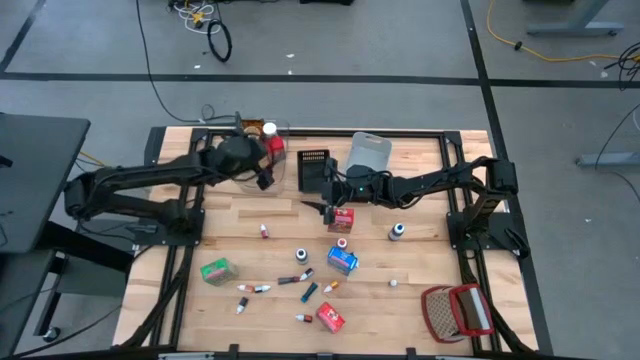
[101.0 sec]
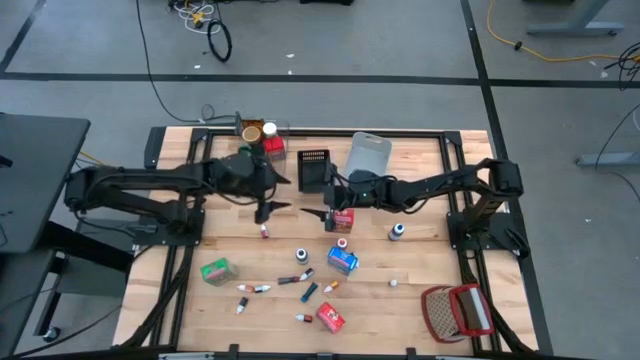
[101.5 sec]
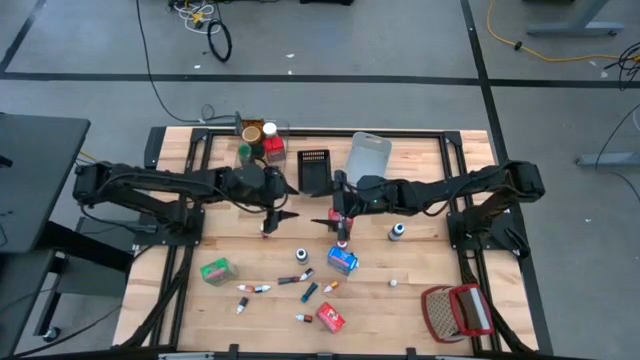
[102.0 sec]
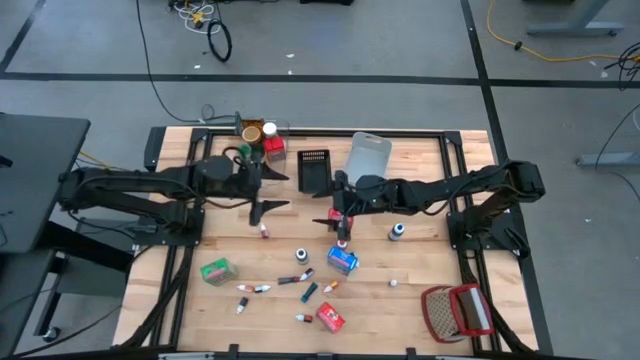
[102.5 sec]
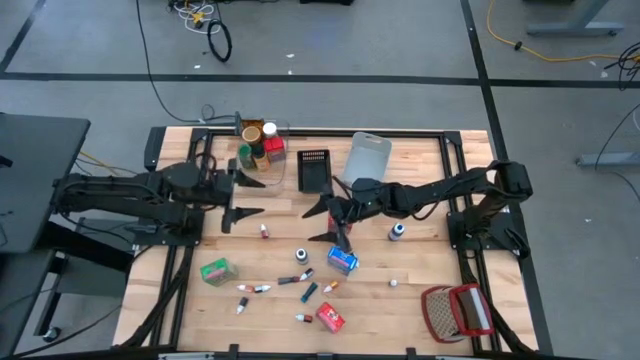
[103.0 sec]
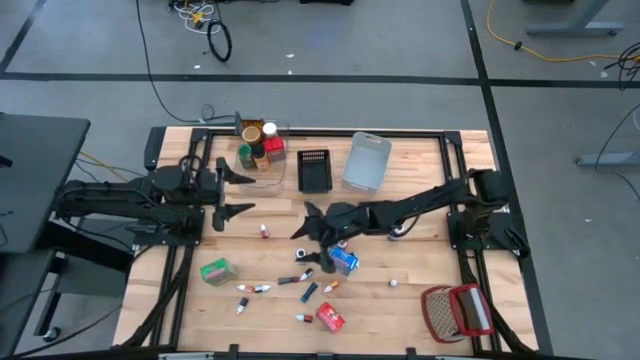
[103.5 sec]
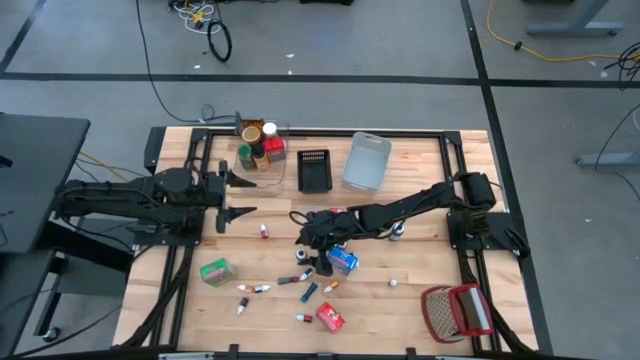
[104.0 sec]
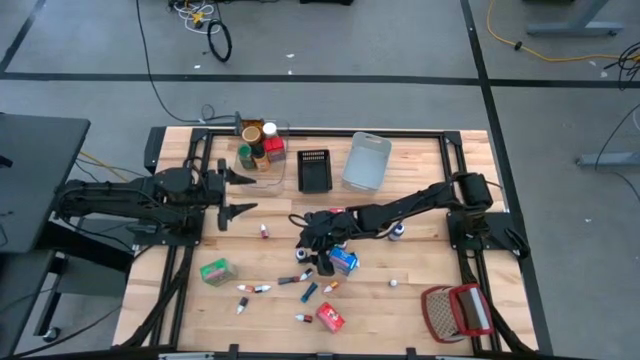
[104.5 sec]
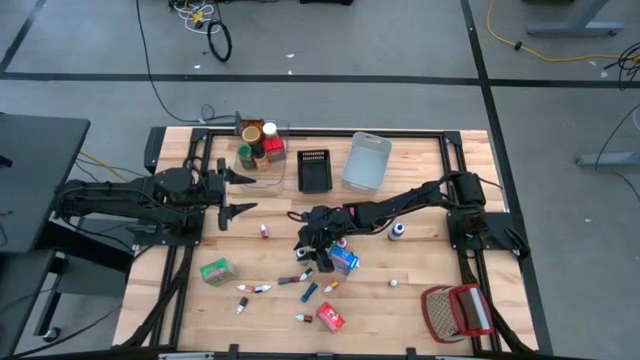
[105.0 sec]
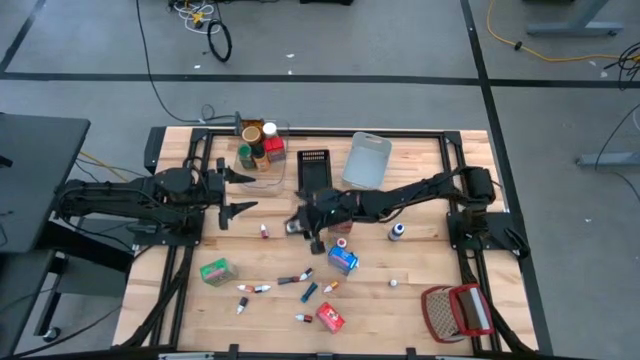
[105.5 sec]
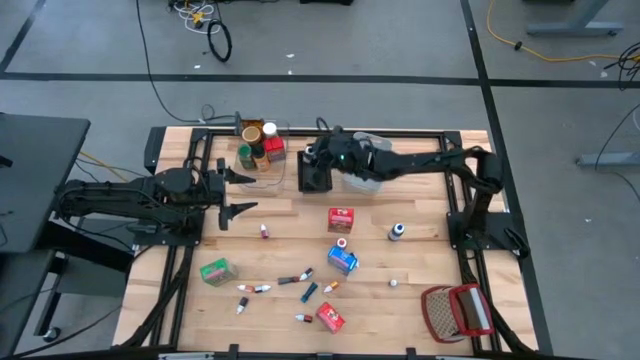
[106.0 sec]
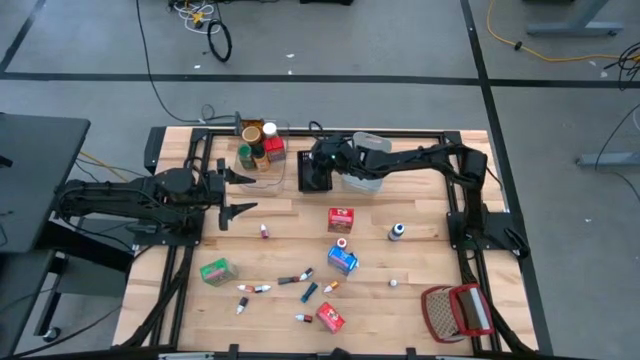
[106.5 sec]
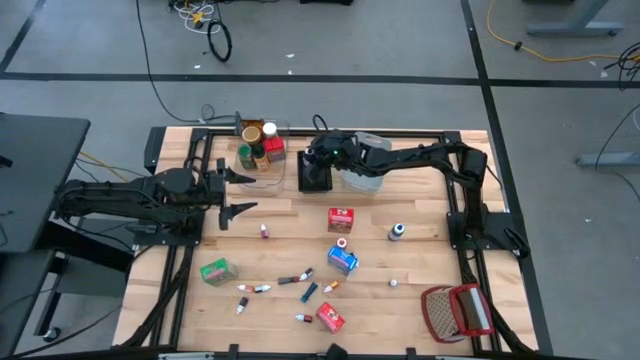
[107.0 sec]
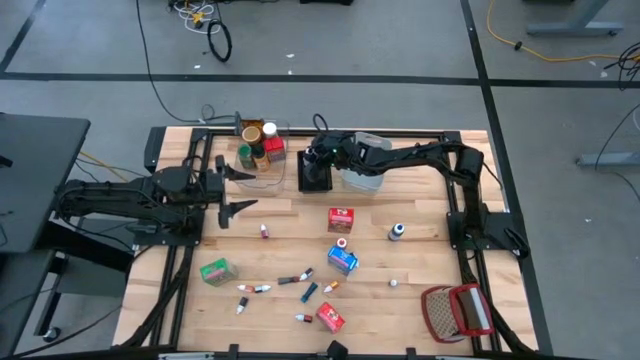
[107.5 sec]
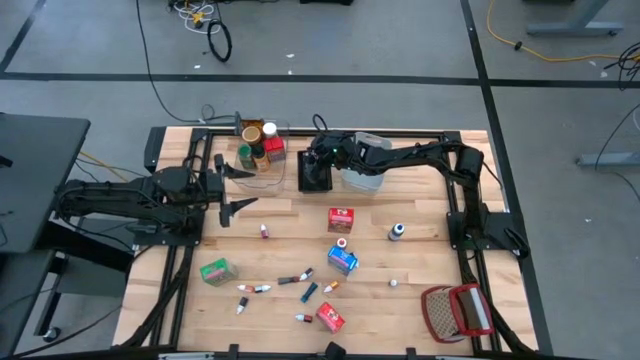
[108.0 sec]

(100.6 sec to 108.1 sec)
Task: Pick & Place Kitchen Items
Put the large black food coloring bottle into the black bin

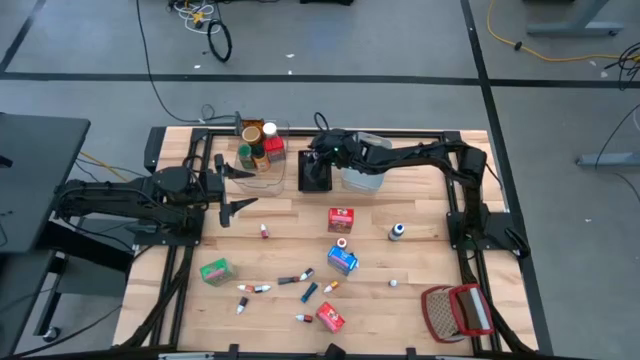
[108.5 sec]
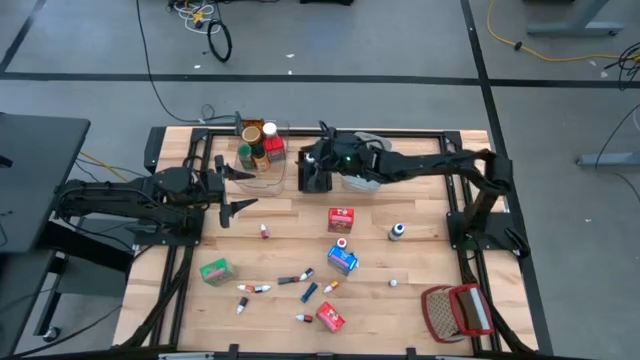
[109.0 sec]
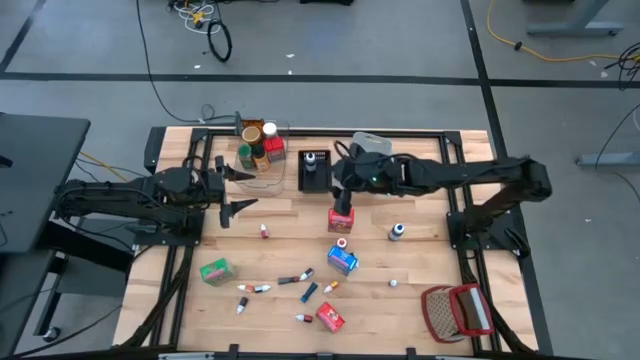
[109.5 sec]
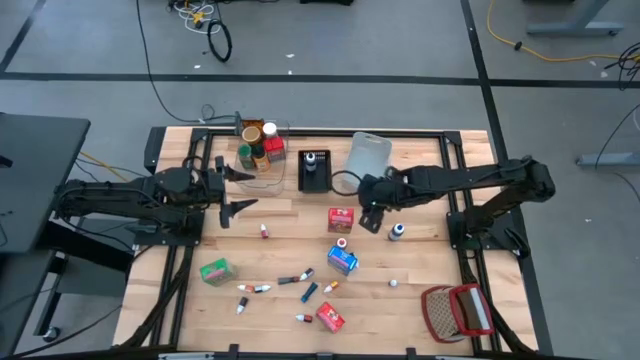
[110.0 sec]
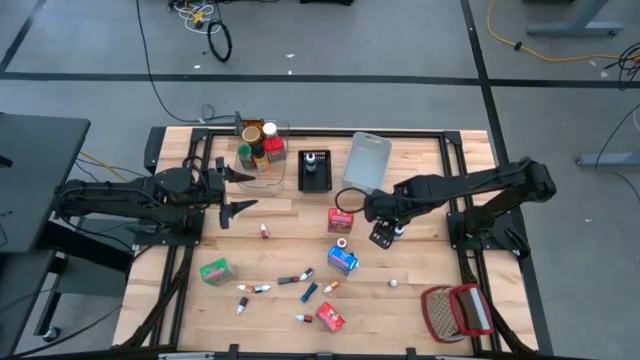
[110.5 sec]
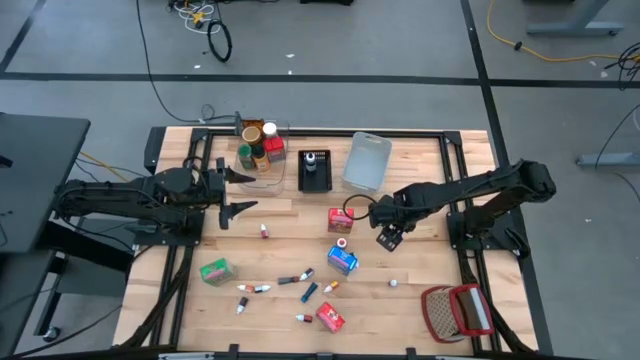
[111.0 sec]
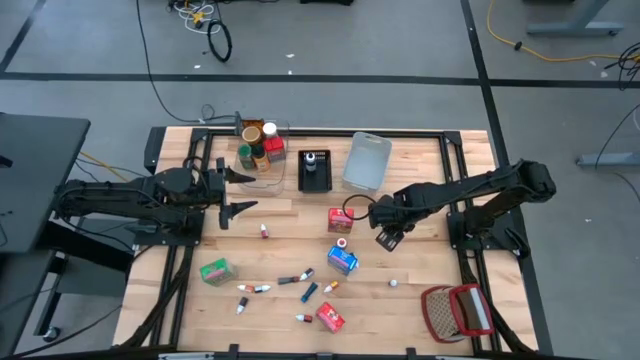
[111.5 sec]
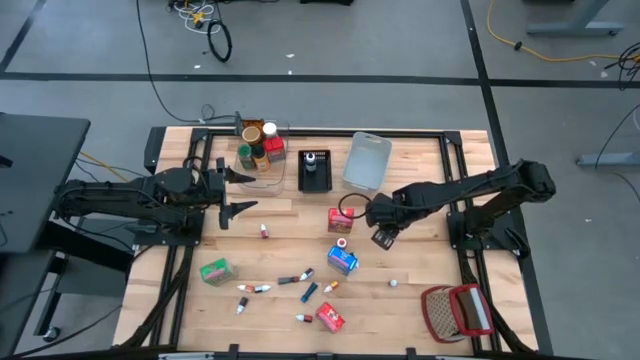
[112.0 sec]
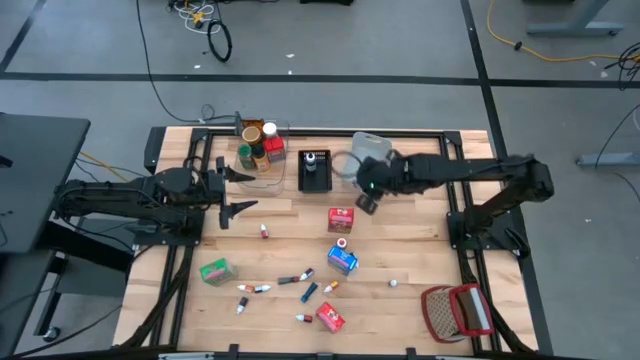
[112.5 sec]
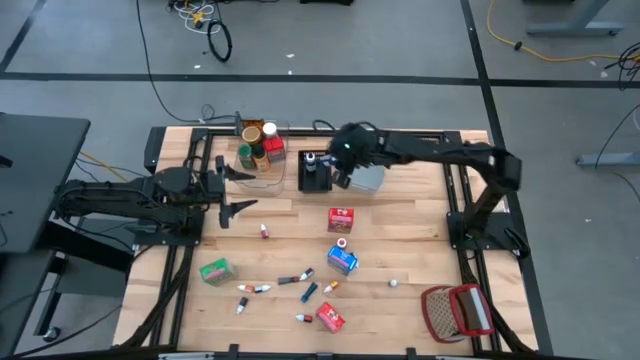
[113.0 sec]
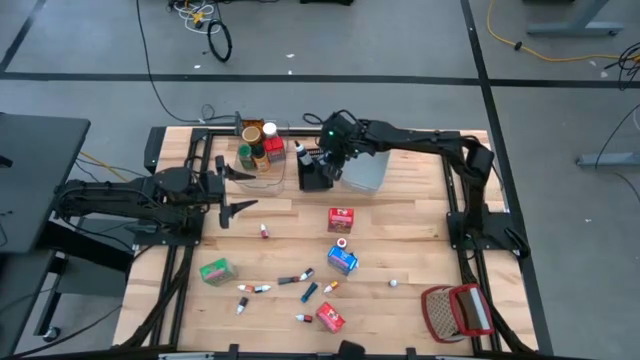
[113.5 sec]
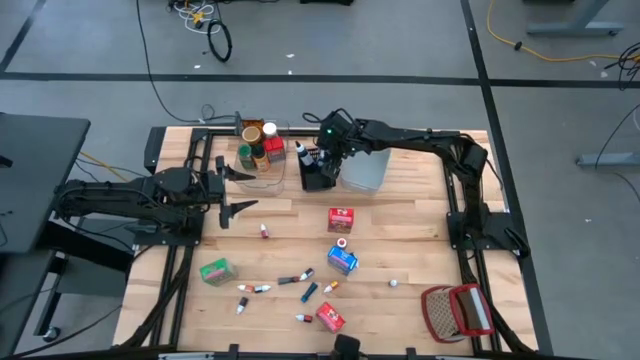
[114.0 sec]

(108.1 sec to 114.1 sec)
Put the large blue food coloring bottle into the black bin

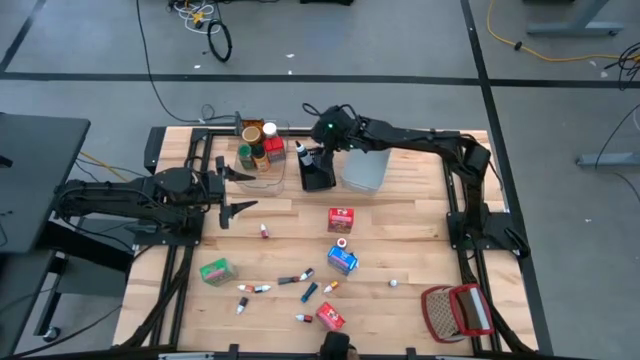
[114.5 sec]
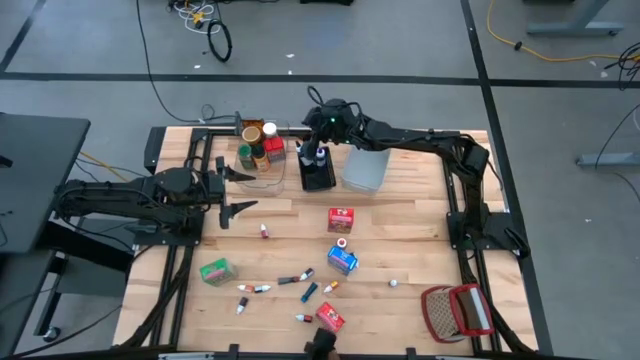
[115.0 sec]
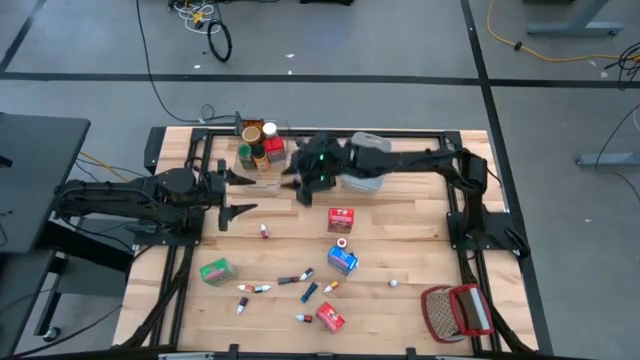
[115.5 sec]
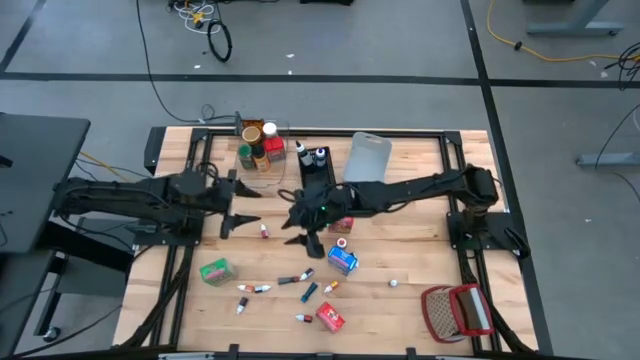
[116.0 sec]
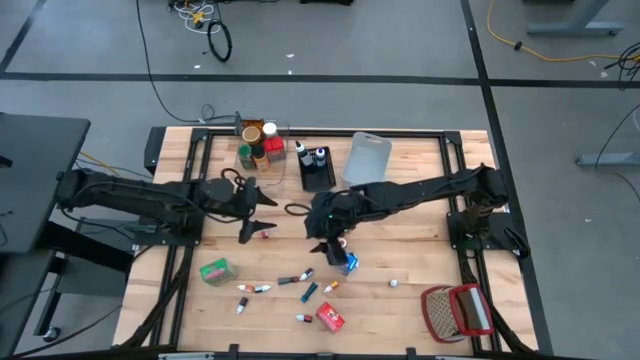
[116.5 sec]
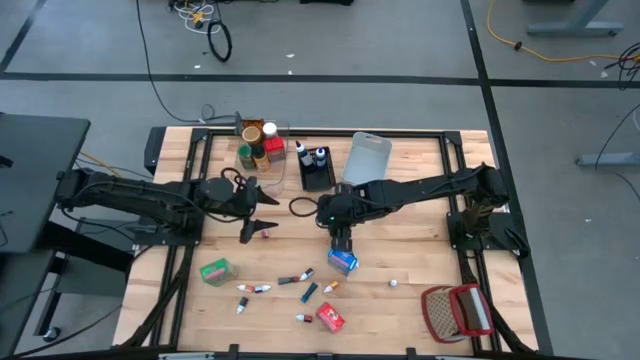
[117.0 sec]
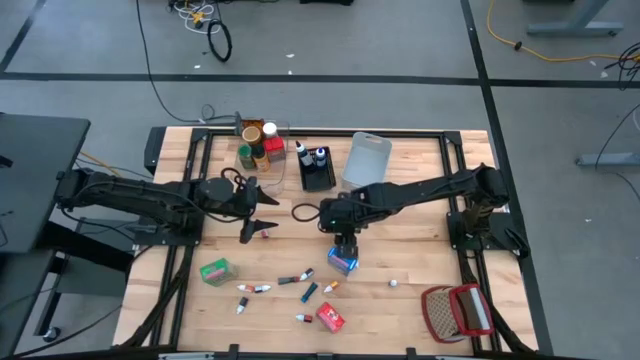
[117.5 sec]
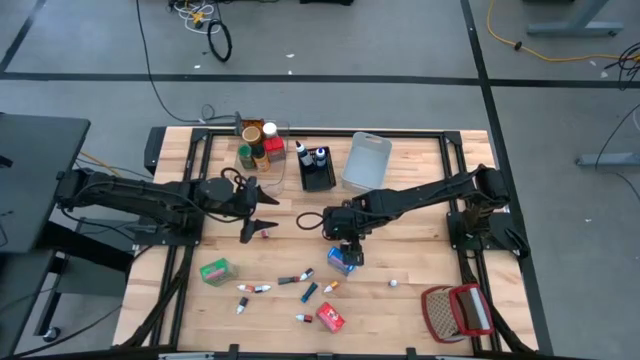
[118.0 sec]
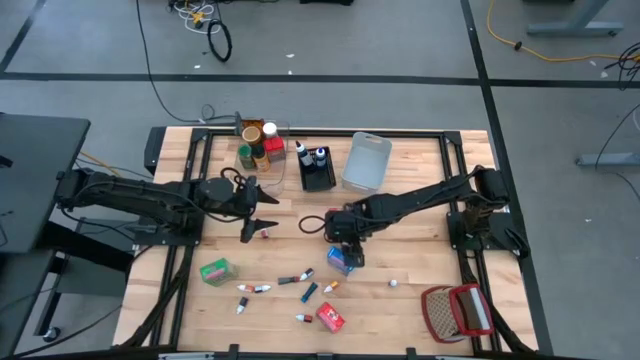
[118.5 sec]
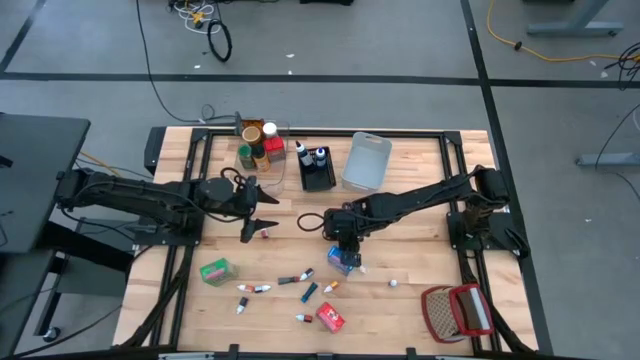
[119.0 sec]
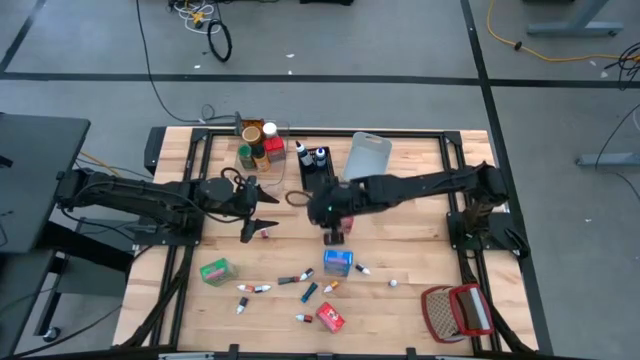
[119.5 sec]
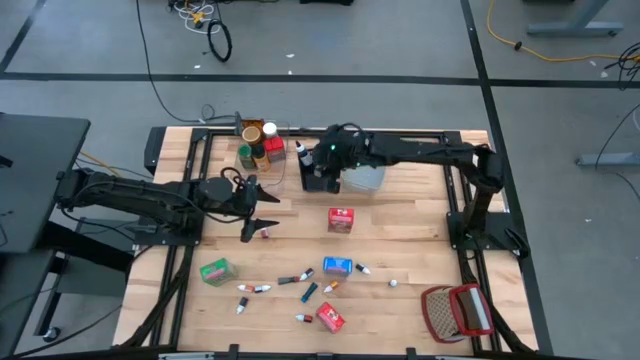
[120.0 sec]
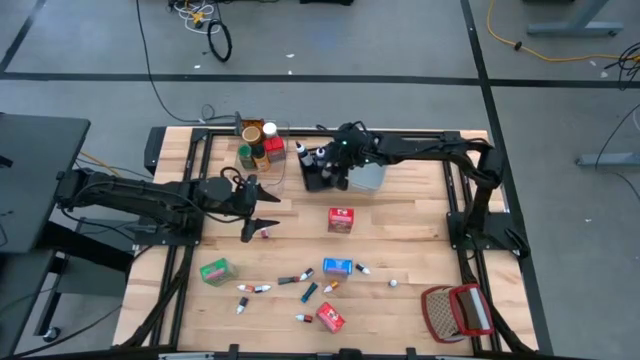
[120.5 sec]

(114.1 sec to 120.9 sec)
Put the orange food coloring bottle into the black bin

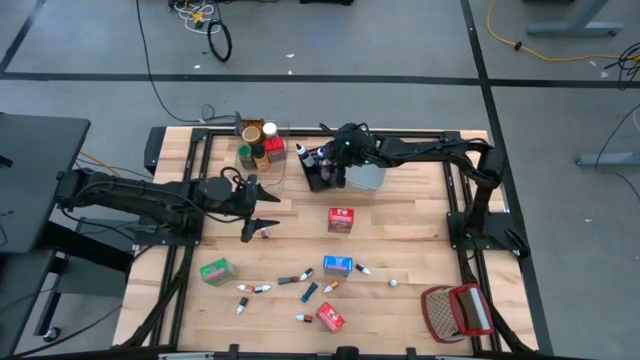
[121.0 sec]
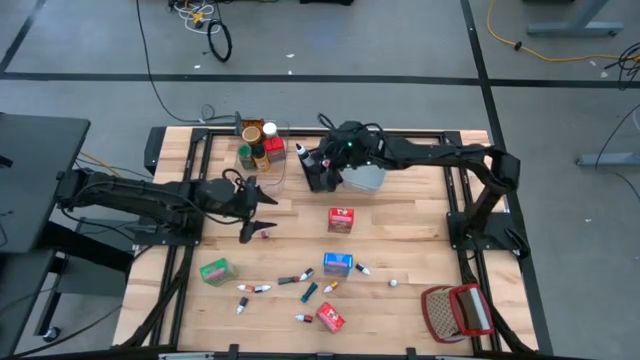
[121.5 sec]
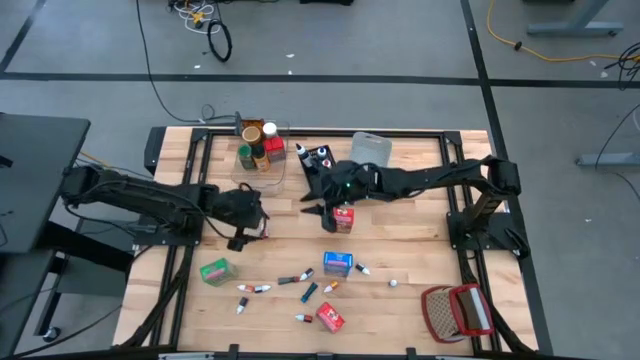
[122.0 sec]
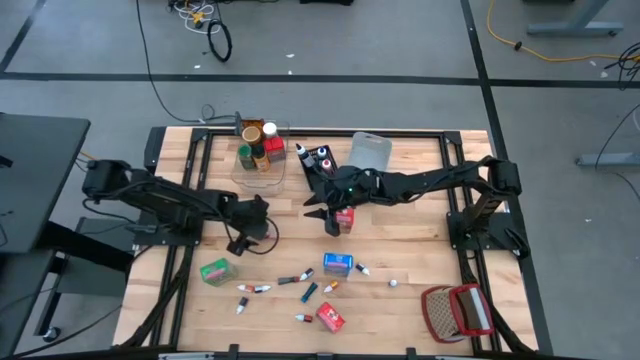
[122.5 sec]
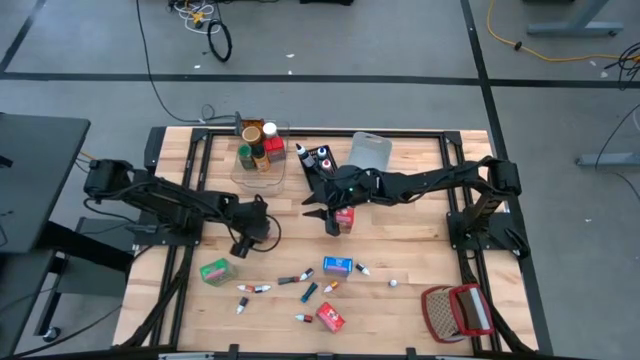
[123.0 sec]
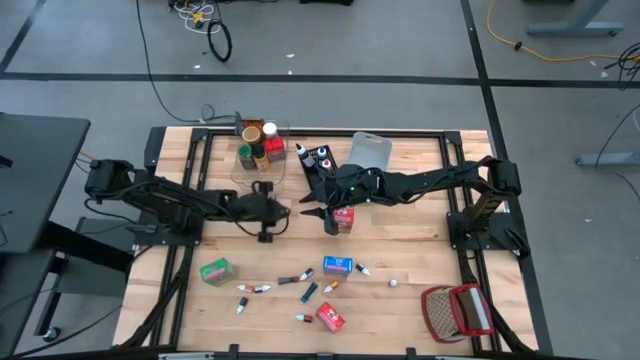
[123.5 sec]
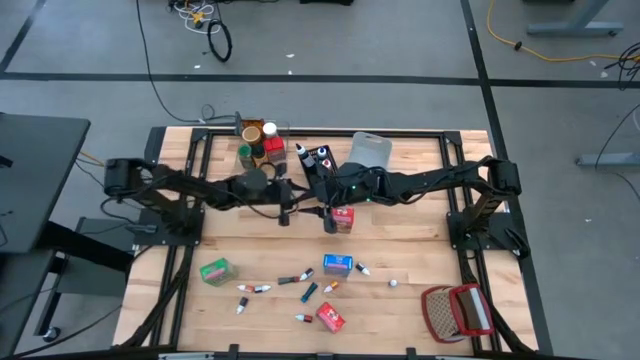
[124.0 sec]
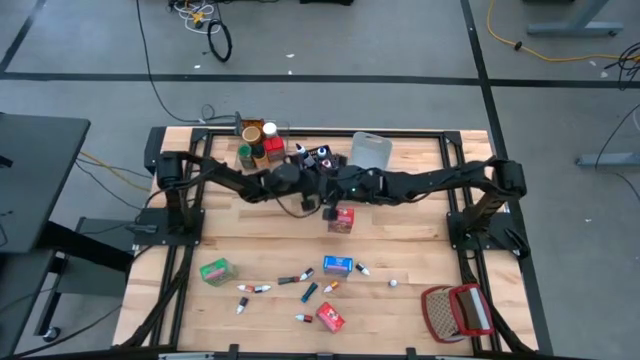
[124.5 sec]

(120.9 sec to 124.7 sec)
Put the pink food coloring bottle into the black bin
